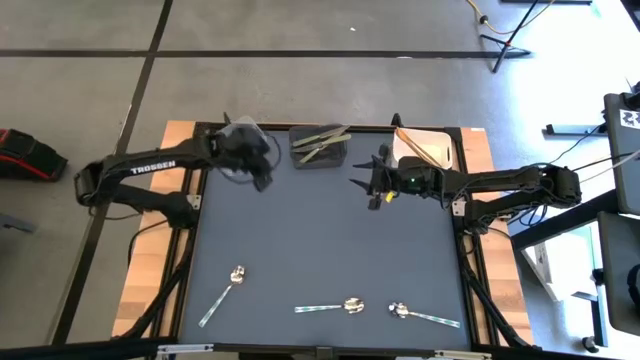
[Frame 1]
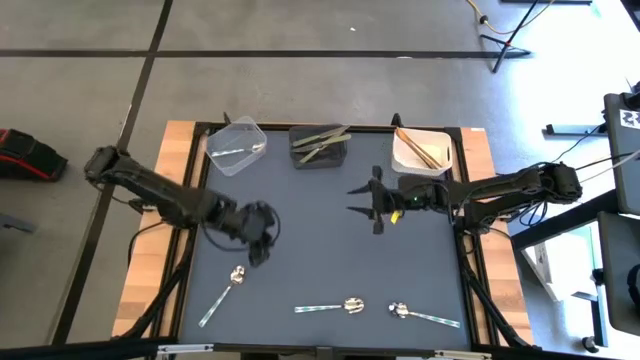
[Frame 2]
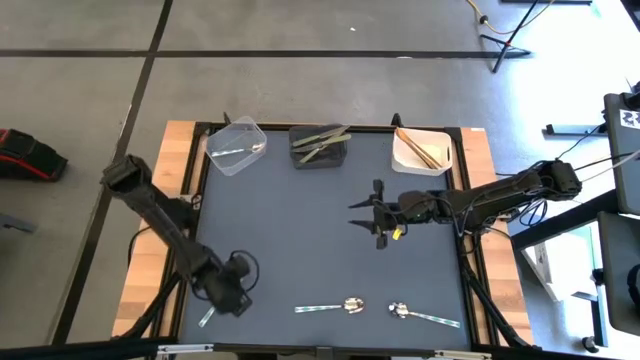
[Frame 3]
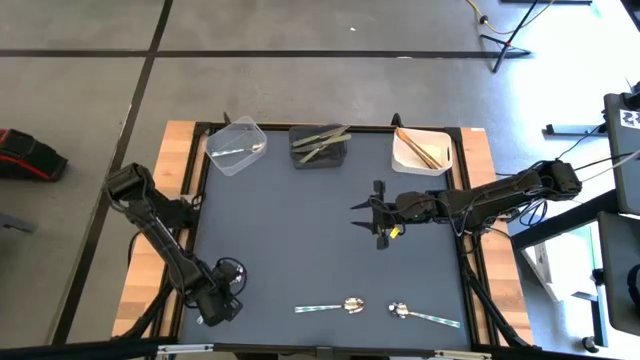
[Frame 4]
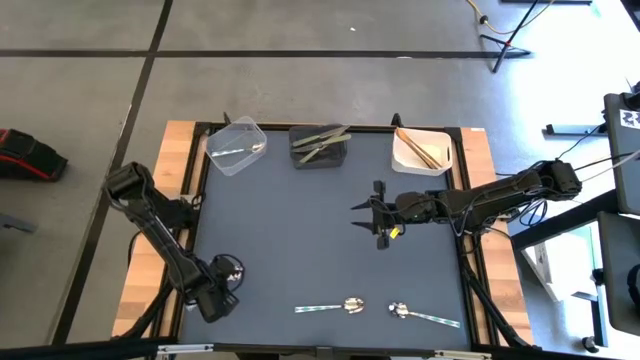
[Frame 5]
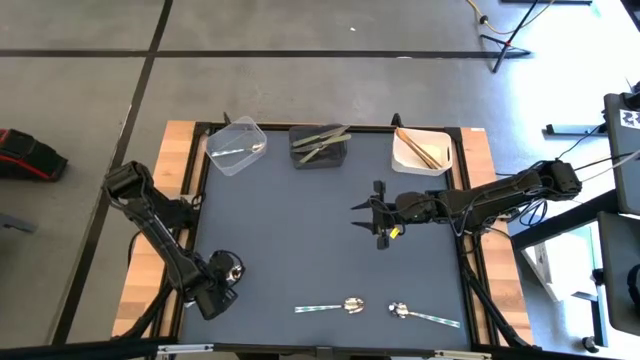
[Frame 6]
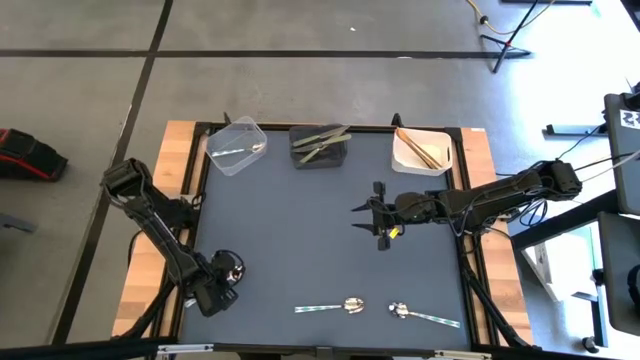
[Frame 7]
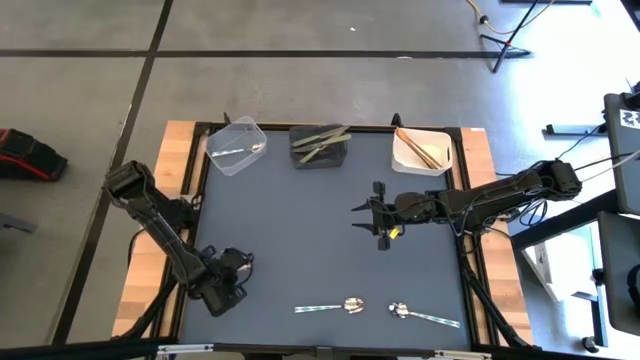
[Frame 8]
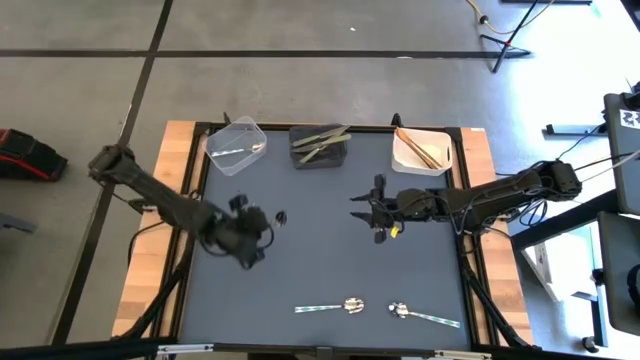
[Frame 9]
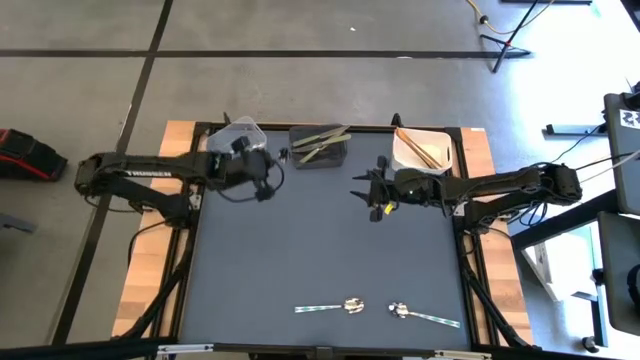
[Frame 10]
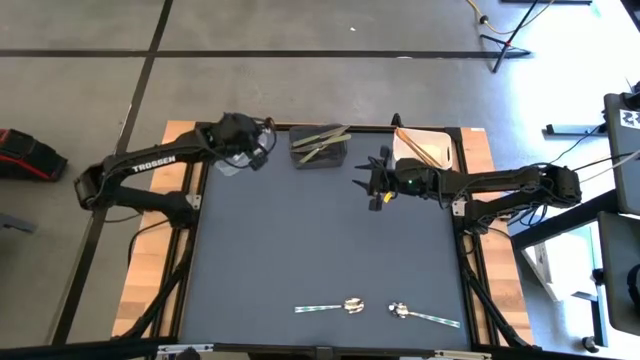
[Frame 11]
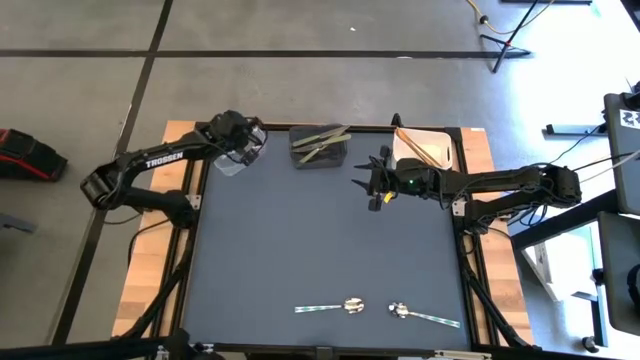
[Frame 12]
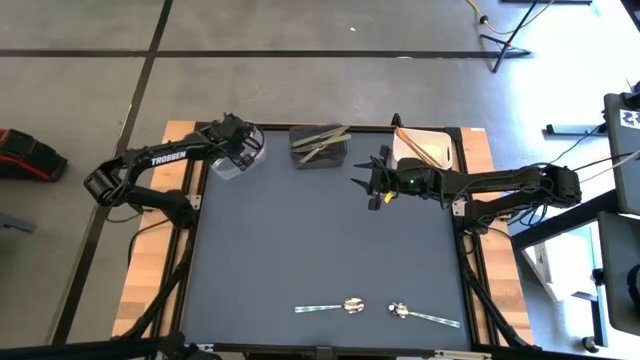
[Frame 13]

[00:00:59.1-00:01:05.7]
Task: Sort silverware by color (type)
Put the left green patterned spoon into the transparent bin

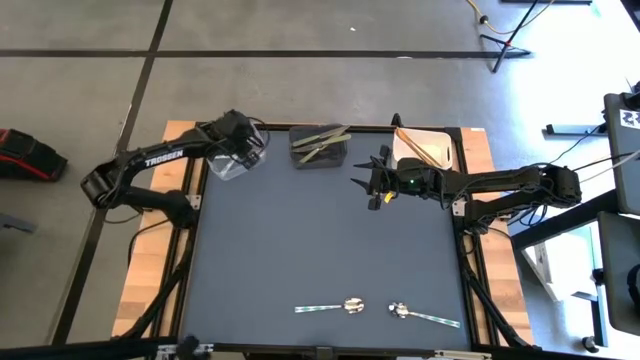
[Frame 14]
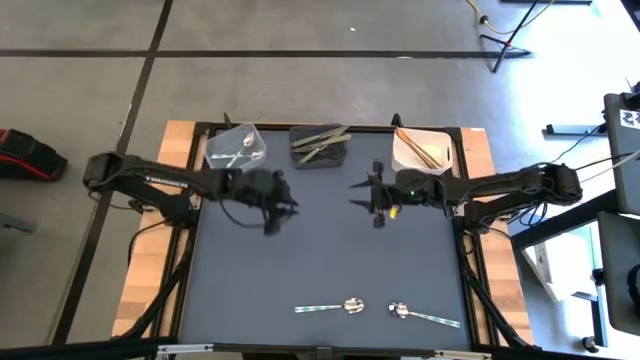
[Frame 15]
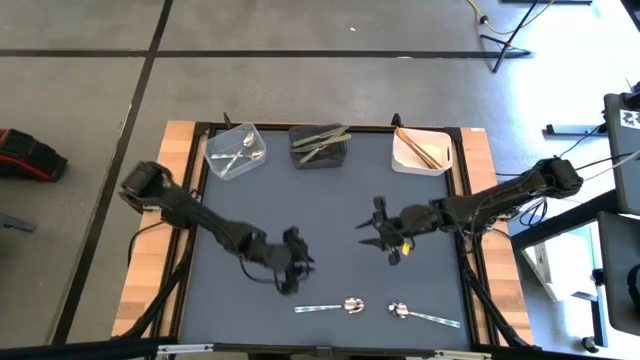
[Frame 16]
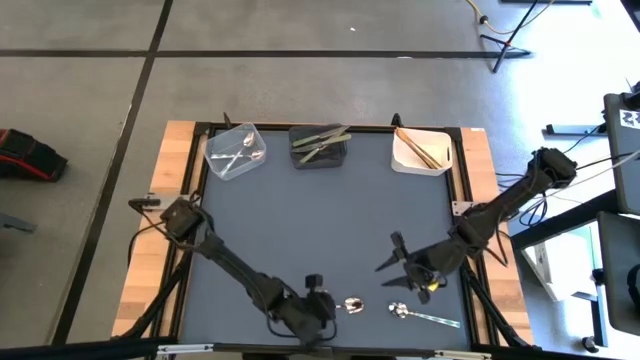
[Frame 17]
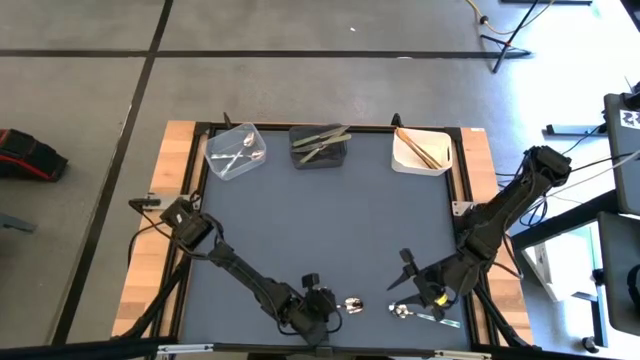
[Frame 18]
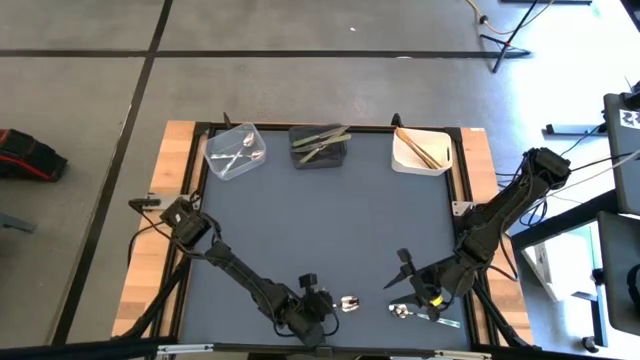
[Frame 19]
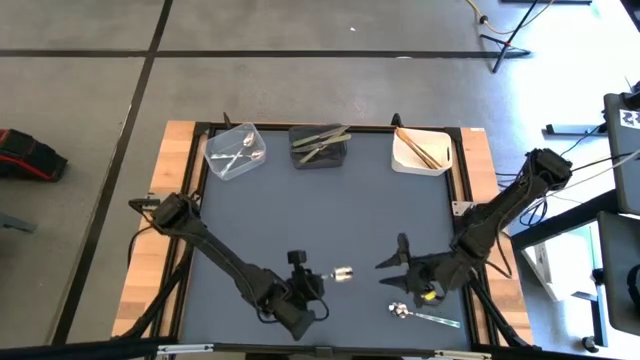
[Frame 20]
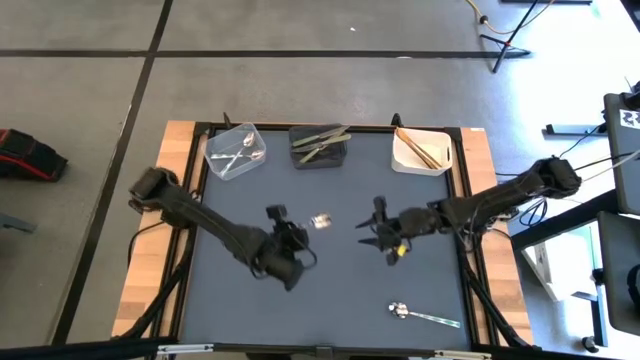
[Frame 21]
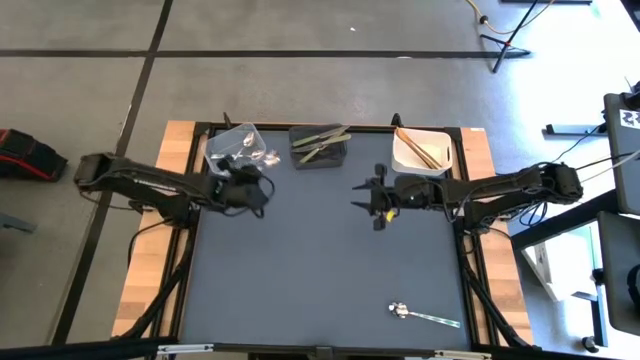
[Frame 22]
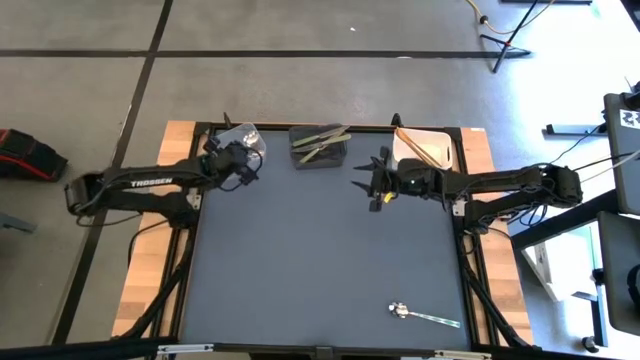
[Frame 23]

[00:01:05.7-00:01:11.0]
Put the left green patterned spoon into the transparent bin

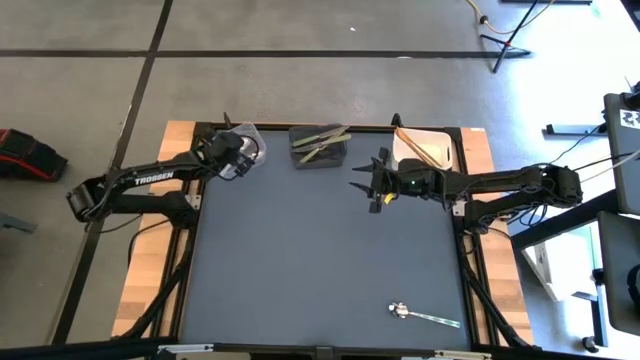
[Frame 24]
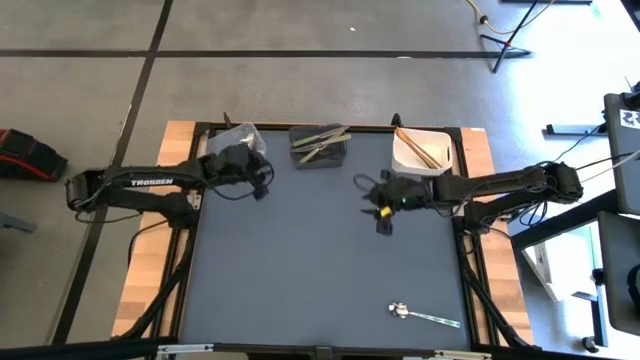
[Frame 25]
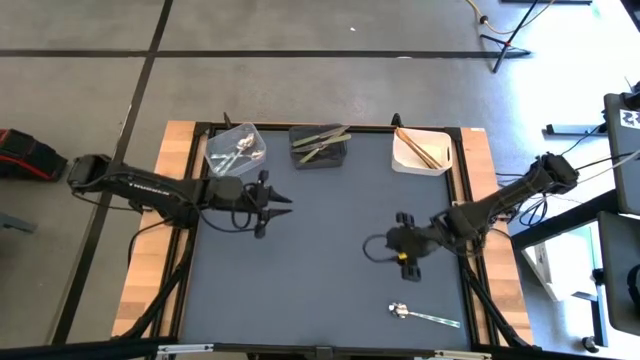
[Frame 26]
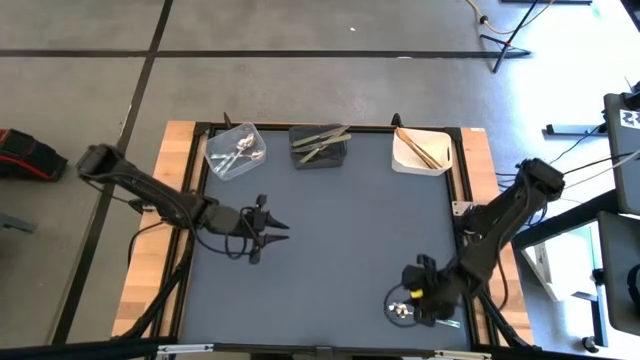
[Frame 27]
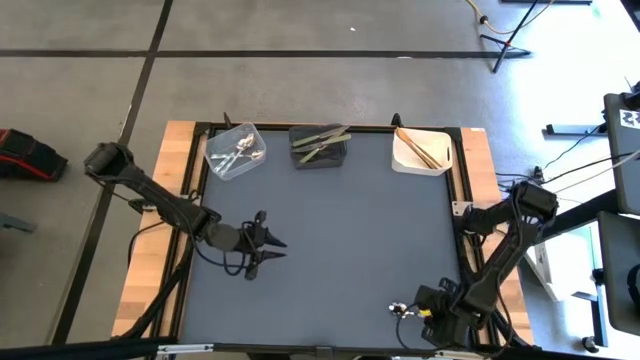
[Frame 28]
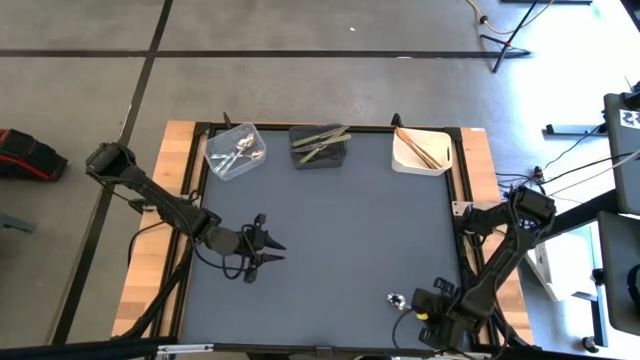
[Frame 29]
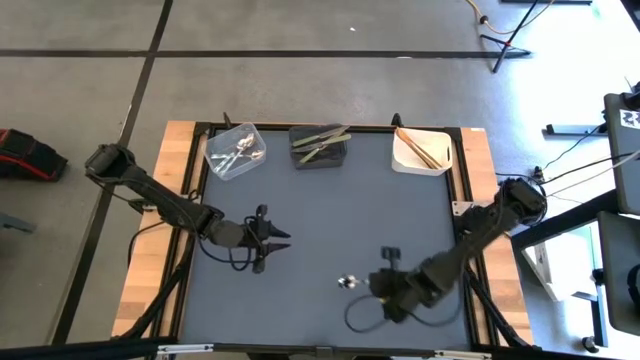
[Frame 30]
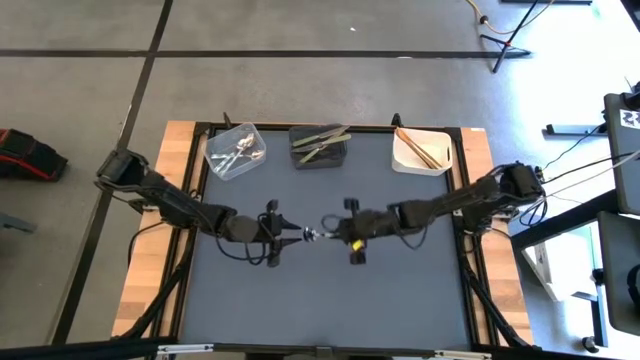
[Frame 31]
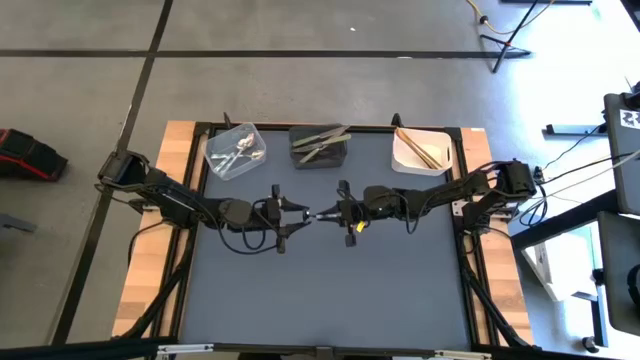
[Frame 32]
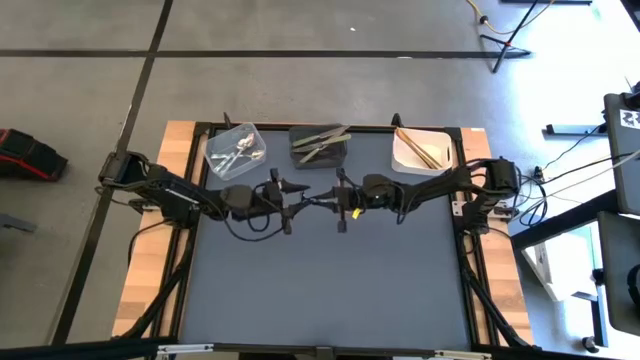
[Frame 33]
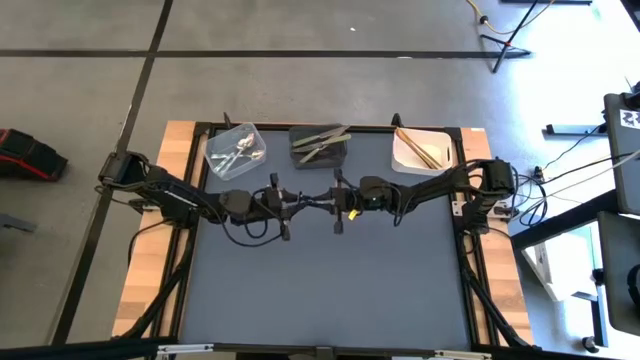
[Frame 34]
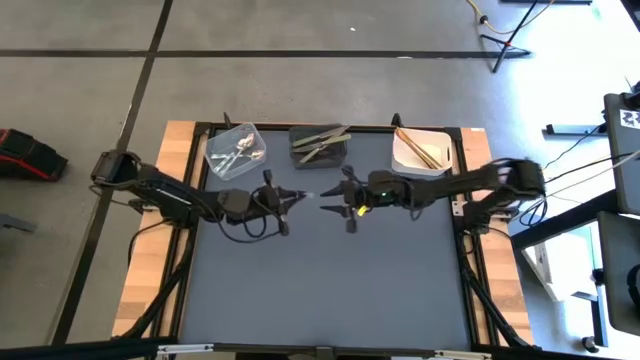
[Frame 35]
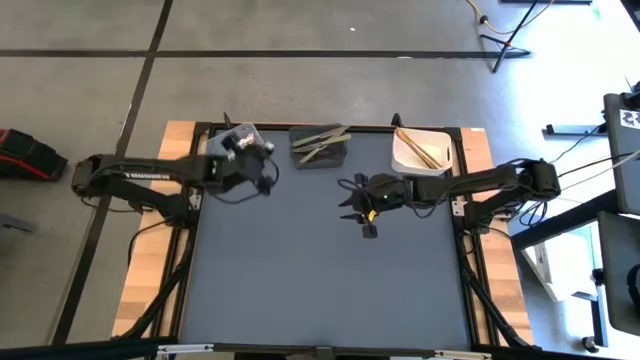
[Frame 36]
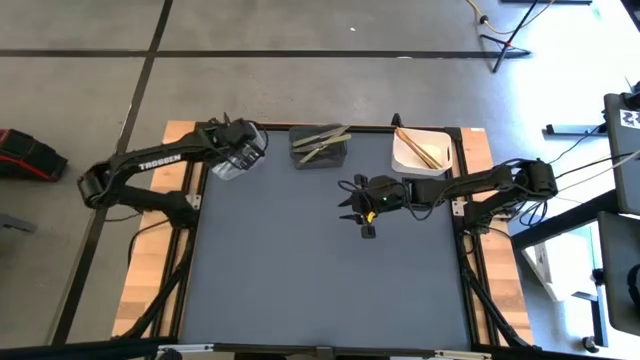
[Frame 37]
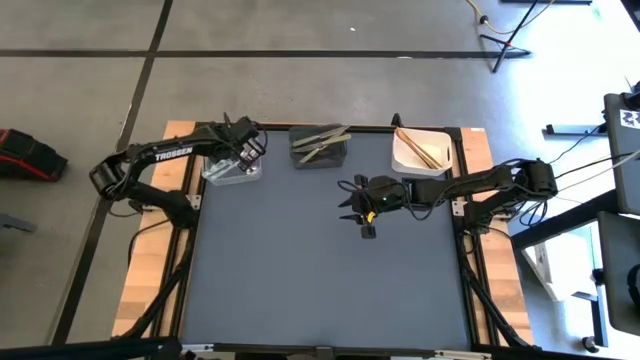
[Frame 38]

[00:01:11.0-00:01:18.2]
Put the green patterned spoon into the transparent bin

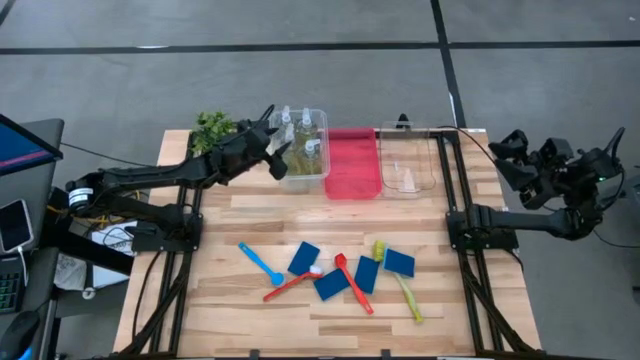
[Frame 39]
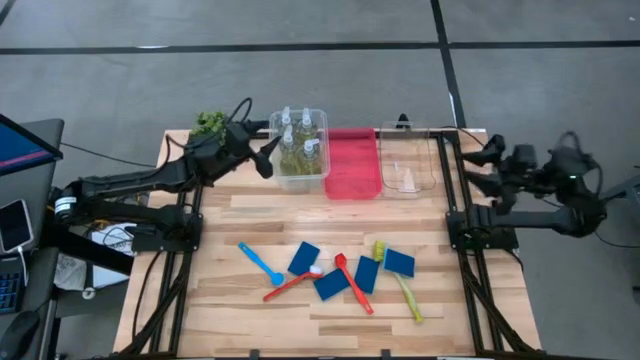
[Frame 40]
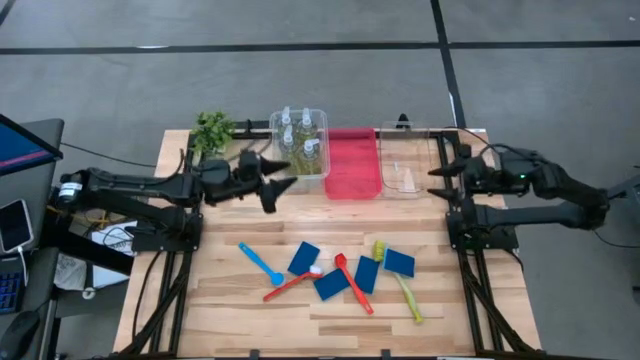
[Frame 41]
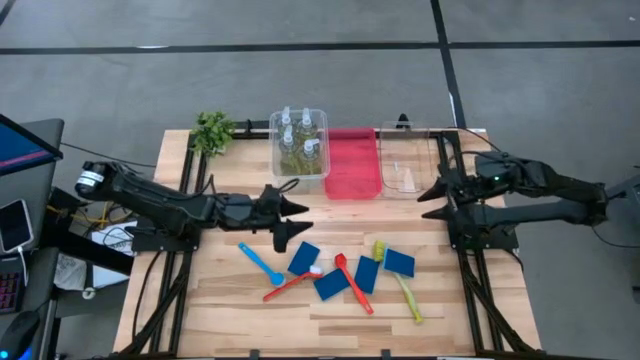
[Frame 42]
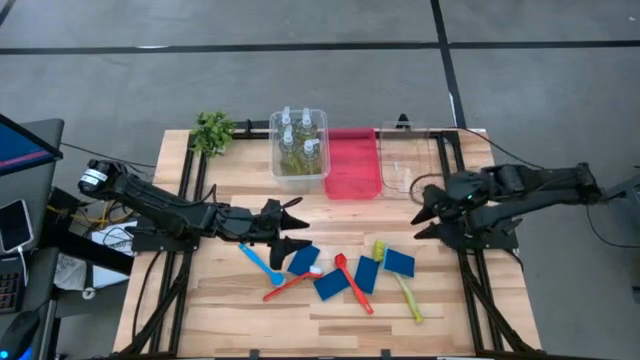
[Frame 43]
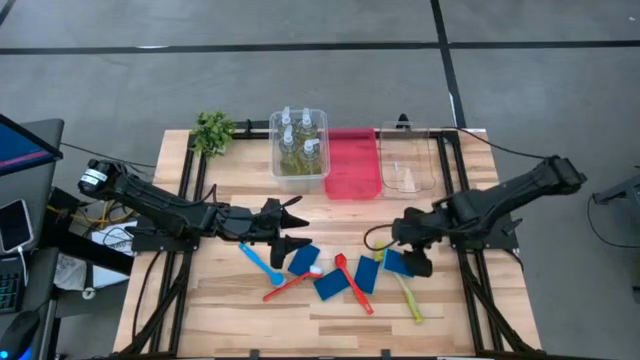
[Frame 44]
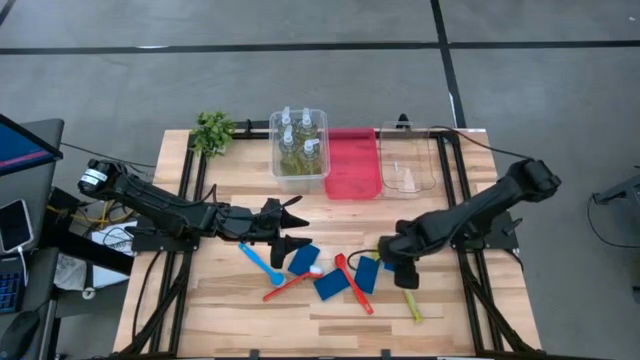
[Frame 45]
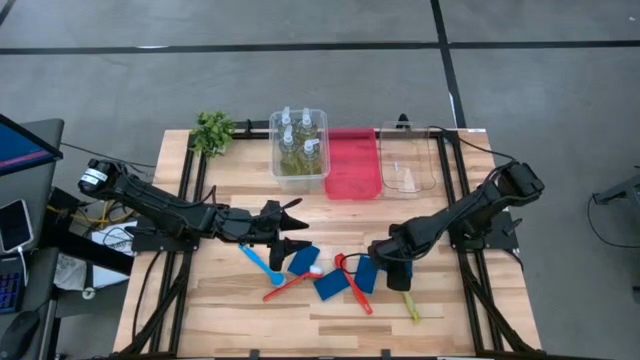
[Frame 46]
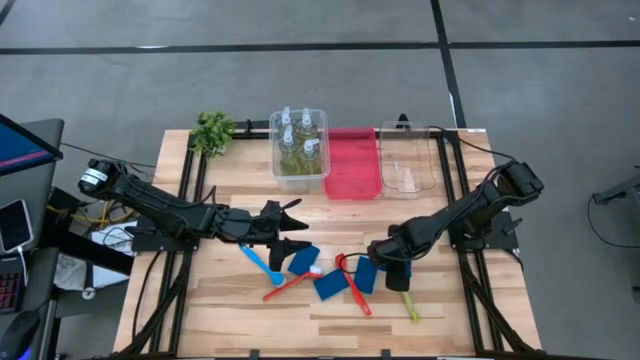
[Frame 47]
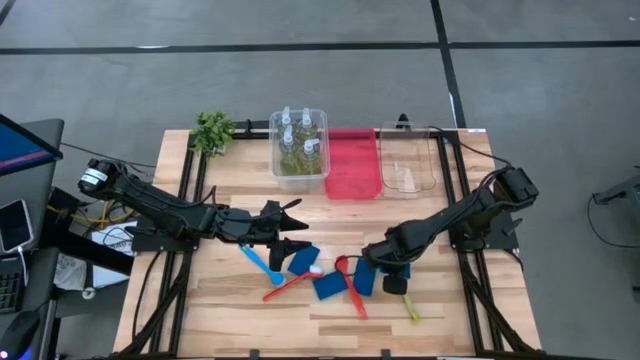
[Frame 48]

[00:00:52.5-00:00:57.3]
Task: Pick & Place Kitchen Sink Supplies
Put the blue sponge into the red bin
